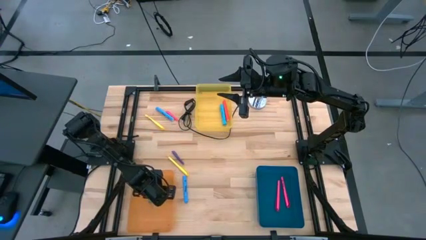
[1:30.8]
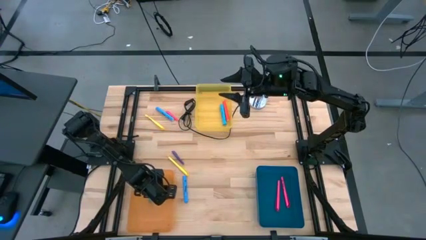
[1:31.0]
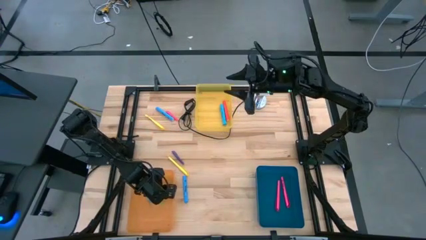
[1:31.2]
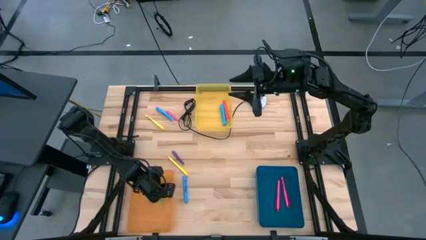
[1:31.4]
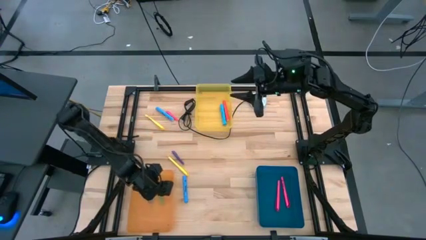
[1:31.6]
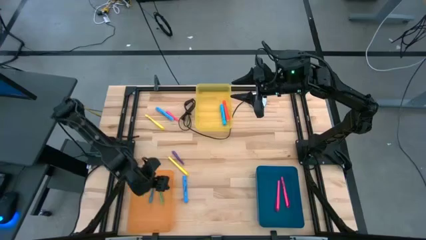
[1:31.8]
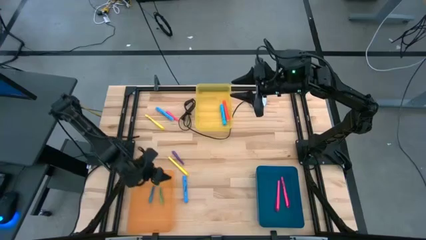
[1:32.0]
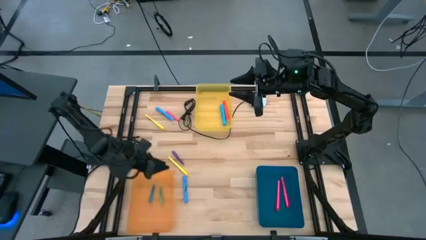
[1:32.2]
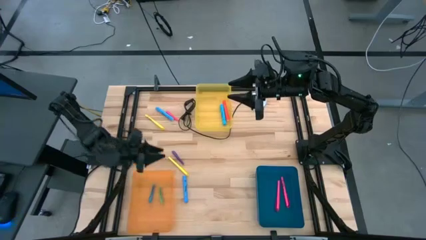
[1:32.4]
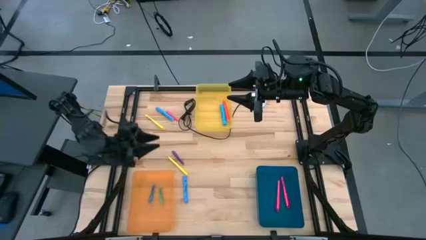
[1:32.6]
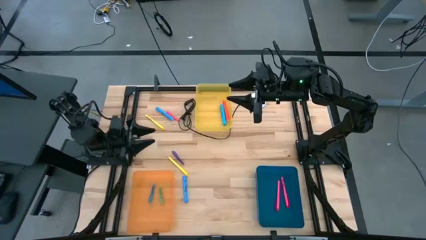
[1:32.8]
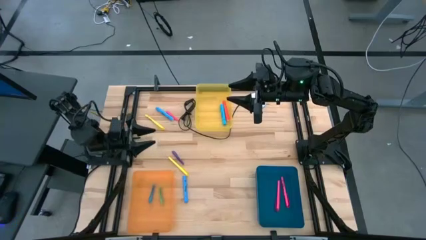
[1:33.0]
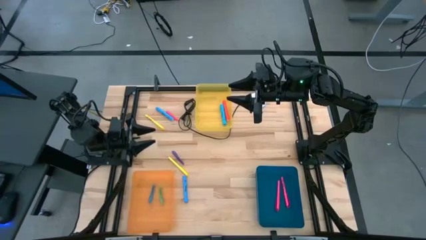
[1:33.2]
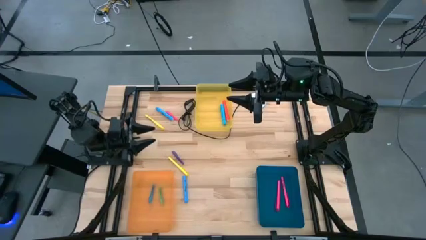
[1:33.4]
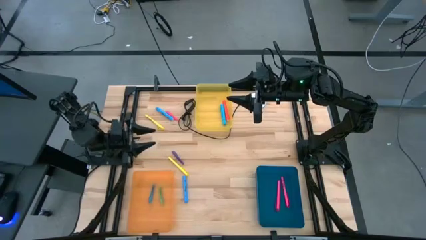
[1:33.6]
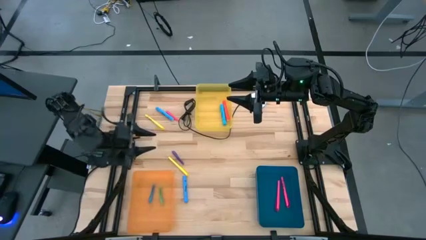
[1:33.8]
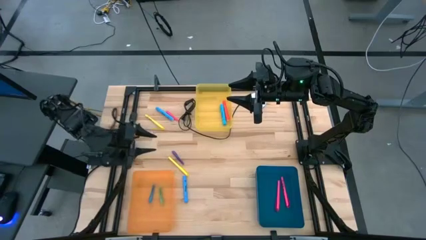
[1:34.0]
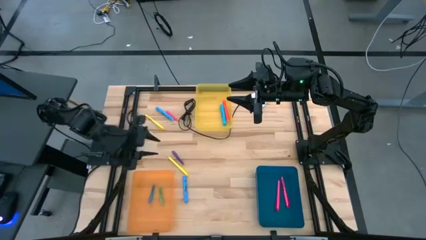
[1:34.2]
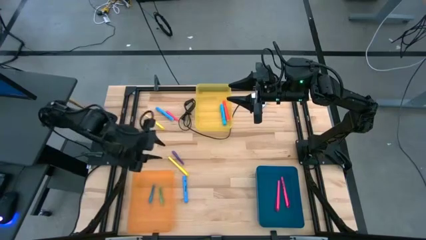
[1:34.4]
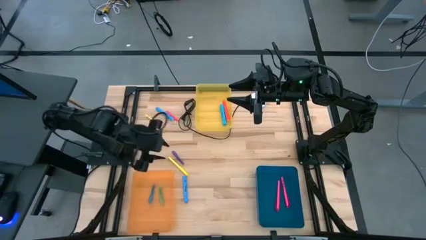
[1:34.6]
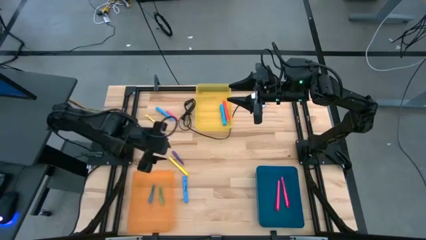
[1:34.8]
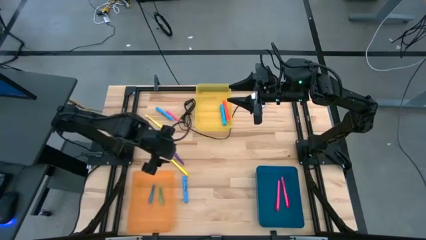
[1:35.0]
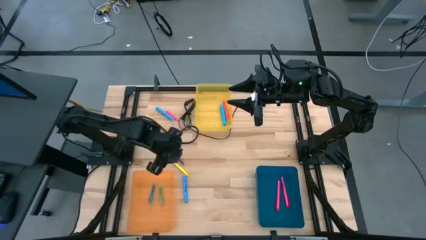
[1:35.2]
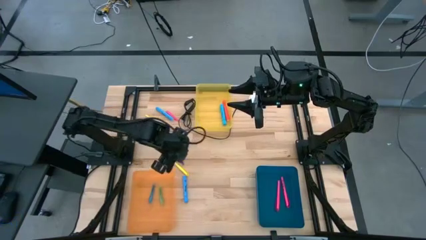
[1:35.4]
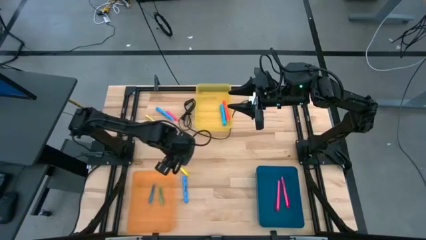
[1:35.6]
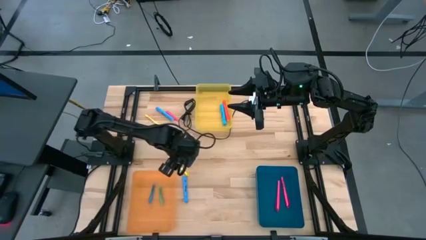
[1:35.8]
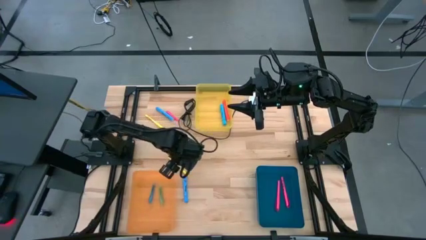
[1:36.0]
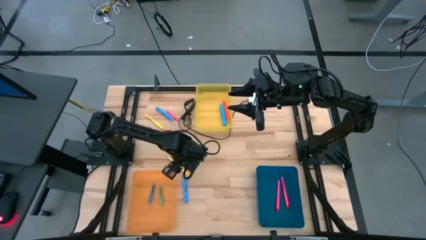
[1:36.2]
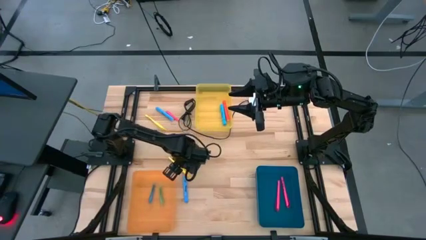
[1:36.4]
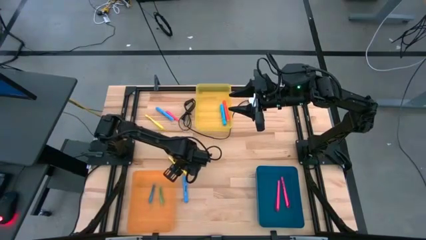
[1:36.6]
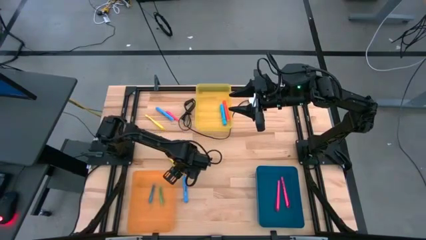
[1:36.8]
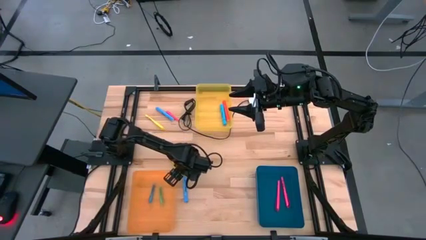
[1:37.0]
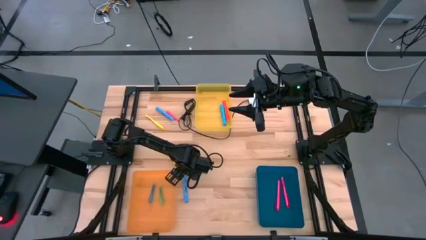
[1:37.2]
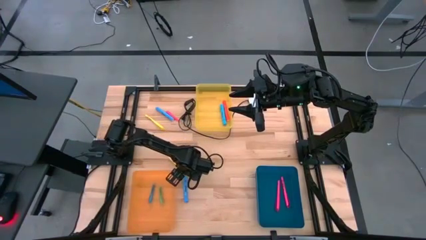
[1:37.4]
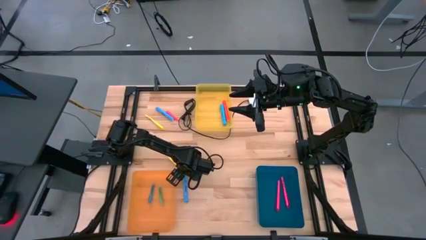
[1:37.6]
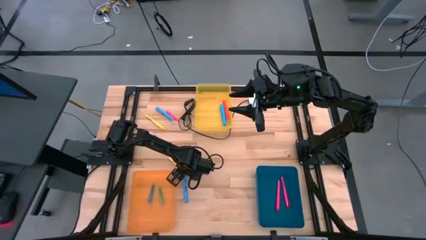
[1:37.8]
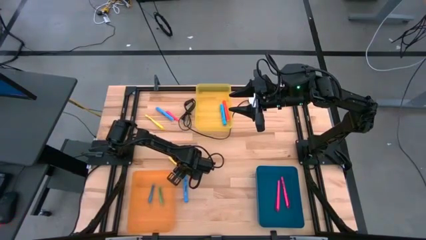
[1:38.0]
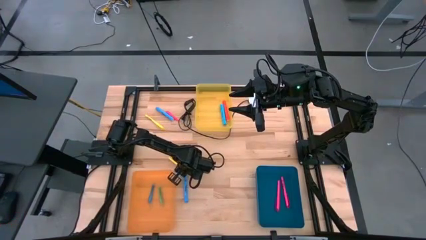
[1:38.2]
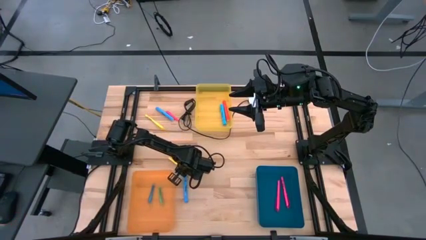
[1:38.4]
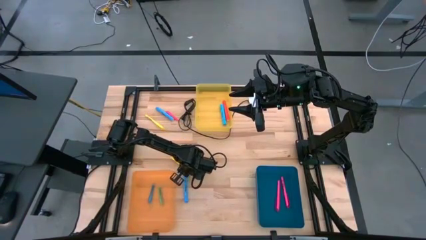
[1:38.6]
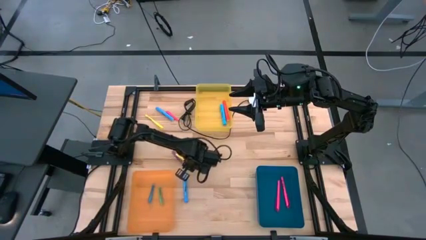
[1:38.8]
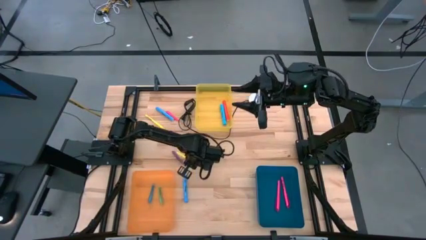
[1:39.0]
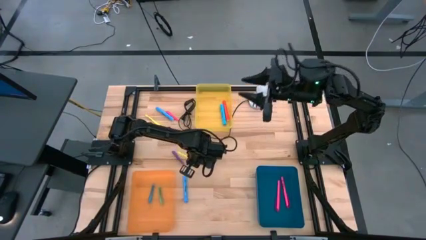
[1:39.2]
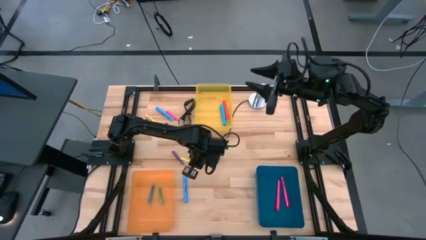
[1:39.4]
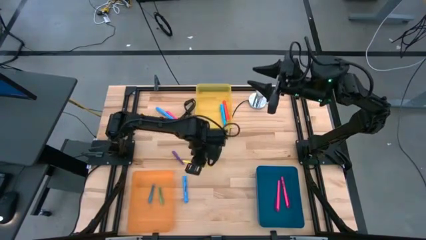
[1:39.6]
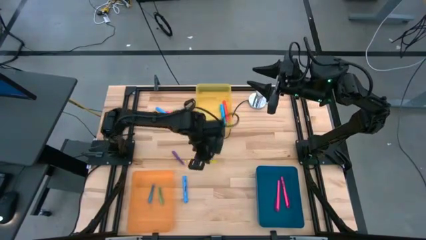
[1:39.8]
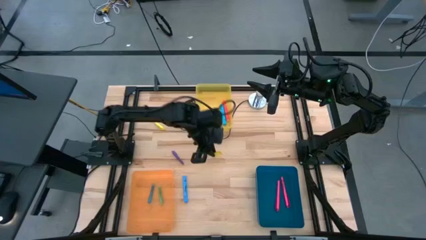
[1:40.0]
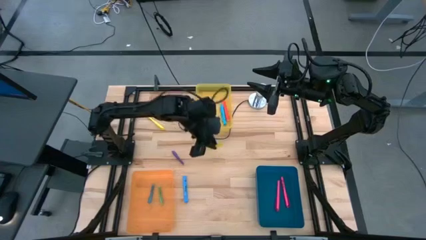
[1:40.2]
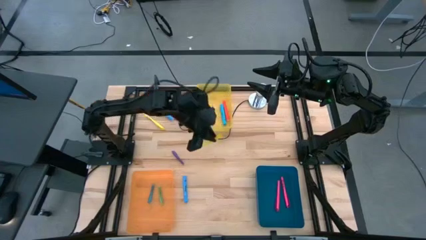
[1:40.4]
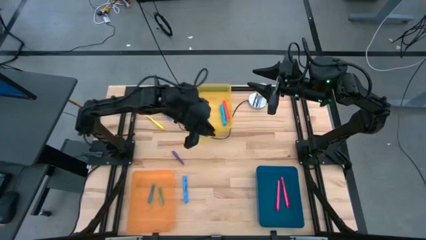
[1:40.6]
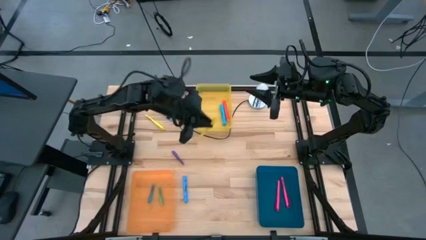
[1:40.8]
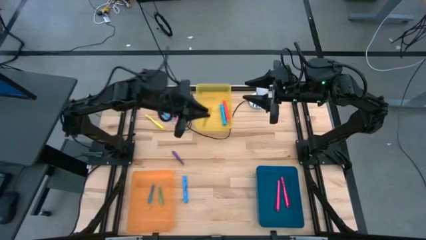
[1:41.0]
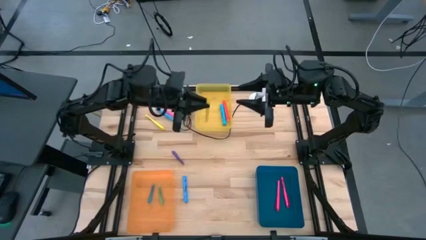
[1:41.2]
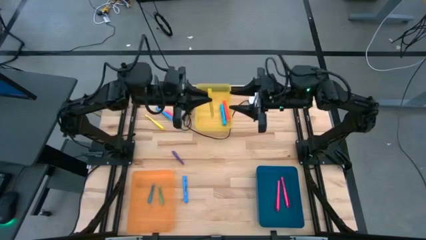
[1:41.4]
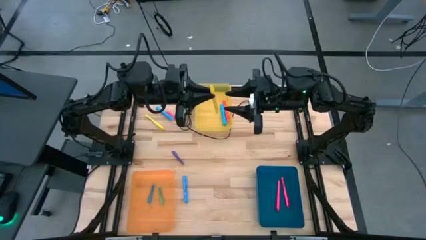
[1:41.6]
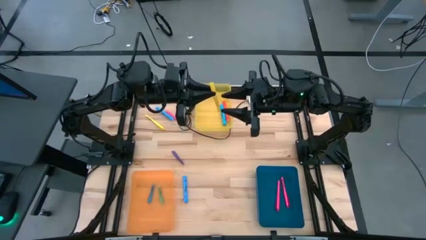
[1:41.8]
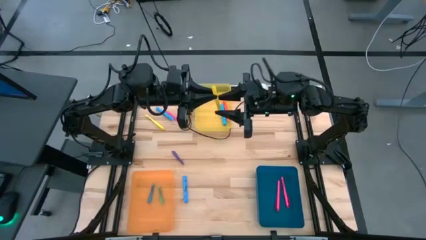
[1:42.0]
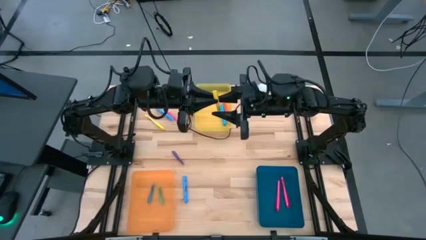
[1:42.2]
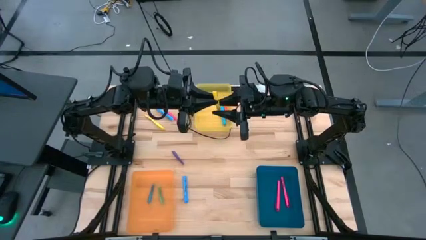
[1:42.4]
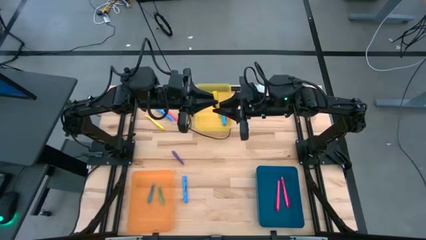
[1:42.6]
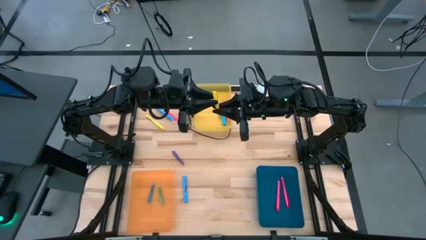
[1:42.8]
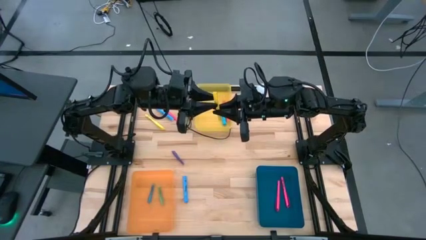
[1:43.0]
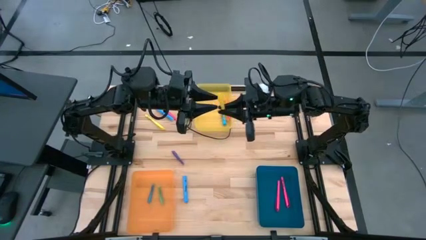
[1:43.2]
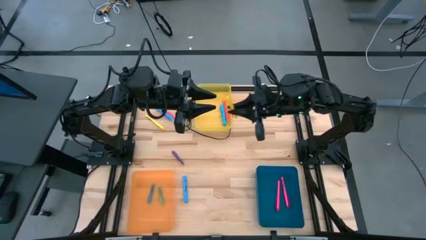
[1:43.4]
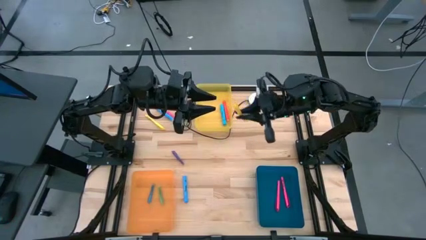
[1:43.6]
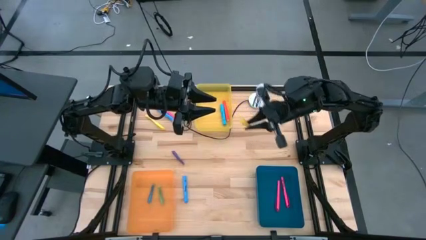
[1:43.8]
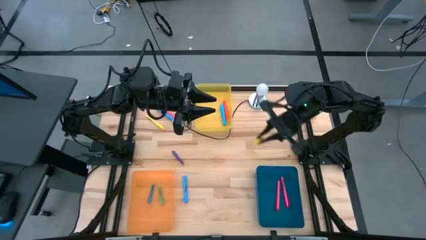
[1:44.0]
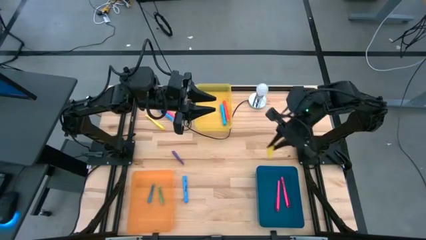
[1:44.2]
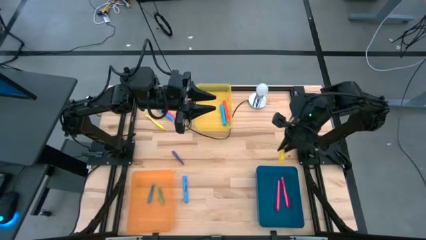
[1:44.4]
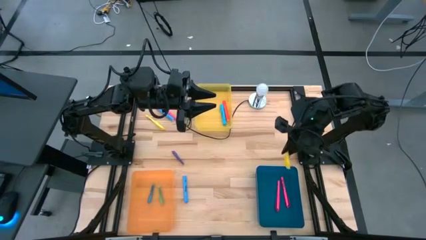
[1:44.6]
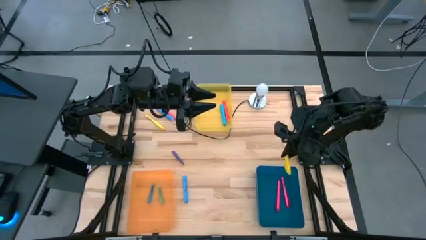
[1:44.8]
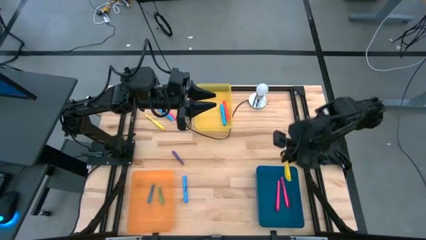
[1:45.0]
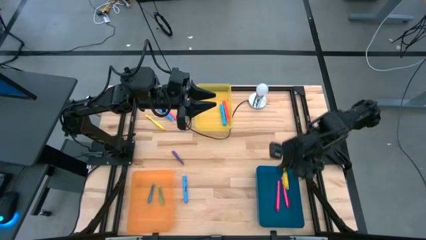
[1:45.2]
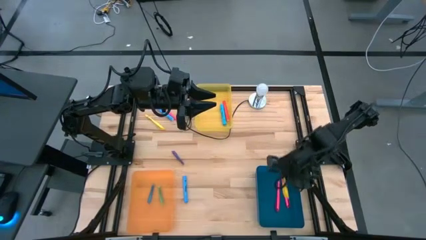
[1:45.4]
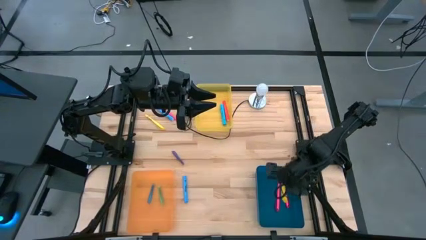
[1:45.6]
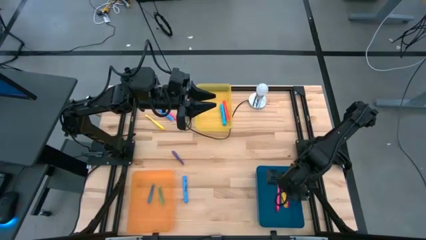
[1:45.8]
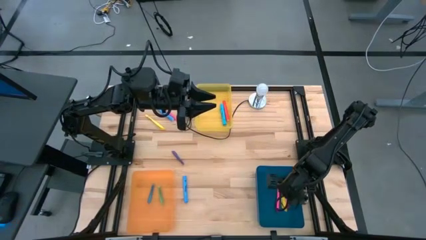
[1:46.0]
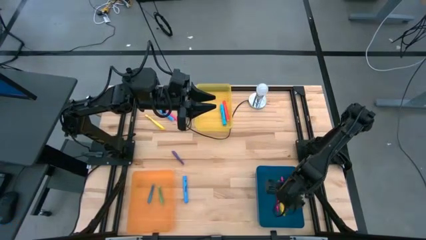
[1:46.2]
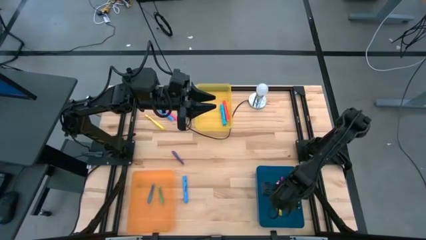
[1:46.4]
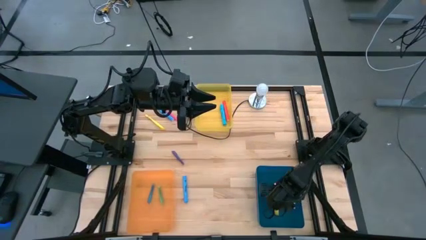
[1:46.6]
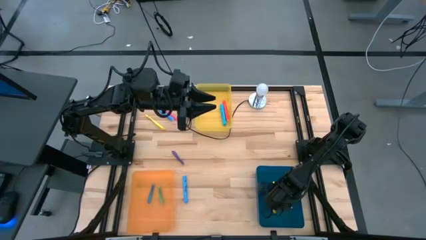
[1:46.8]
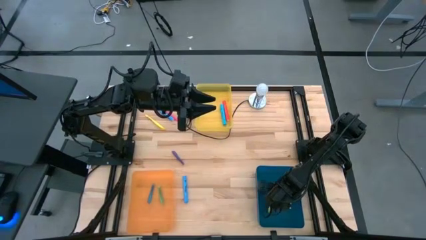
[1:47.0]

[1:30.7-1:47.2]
Task: Pick & Place Markers
Put the bottom yellow highlighter pen into the blue bin
